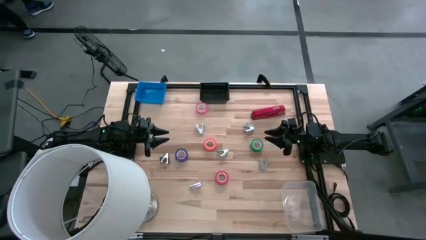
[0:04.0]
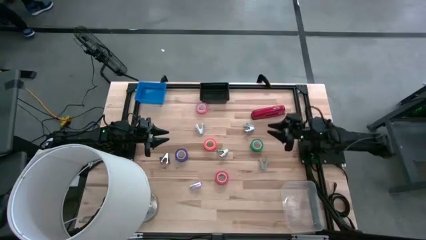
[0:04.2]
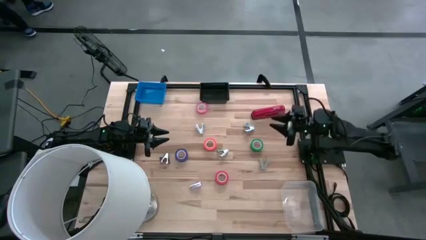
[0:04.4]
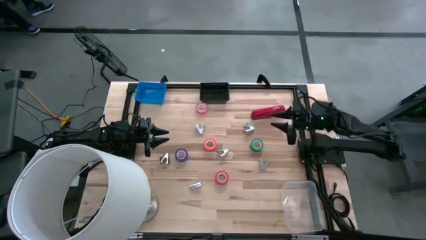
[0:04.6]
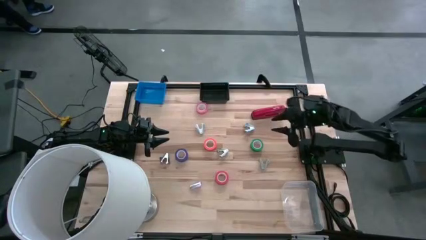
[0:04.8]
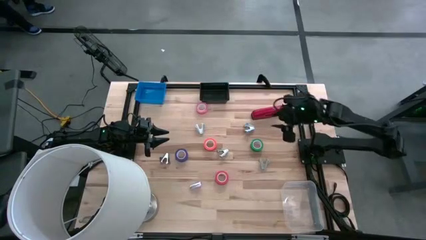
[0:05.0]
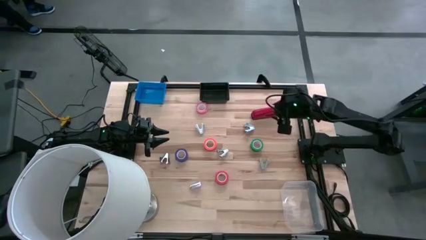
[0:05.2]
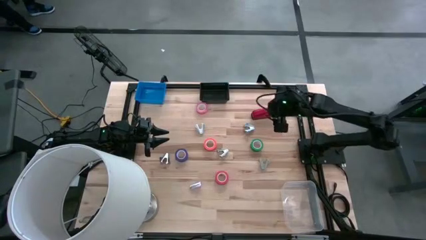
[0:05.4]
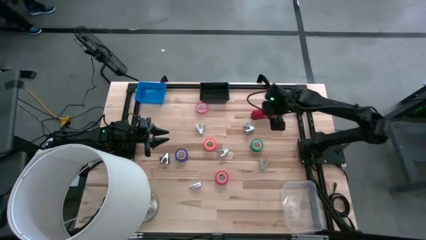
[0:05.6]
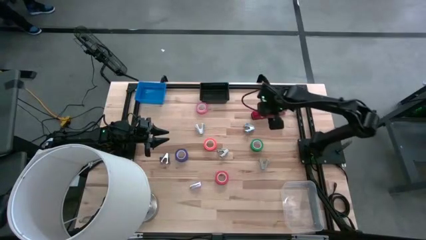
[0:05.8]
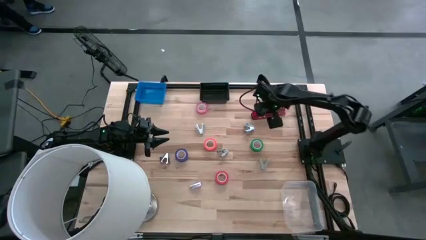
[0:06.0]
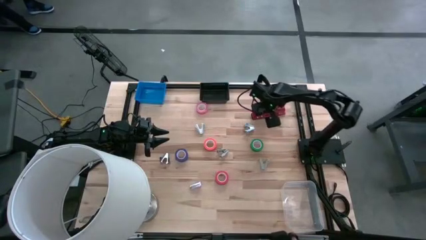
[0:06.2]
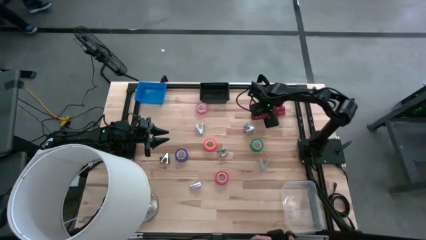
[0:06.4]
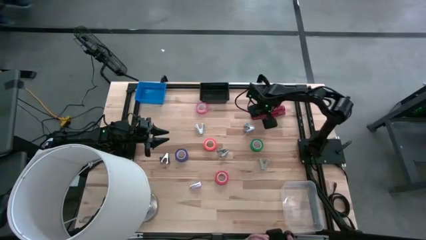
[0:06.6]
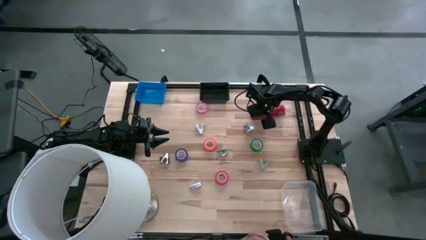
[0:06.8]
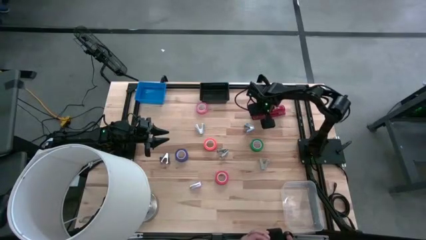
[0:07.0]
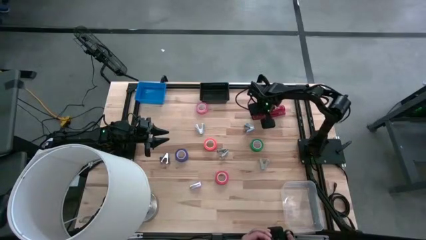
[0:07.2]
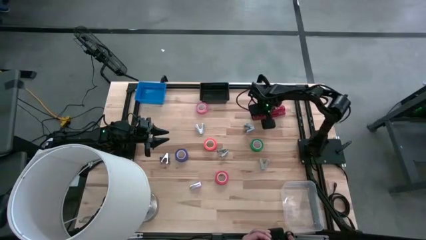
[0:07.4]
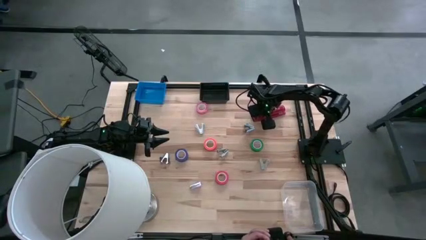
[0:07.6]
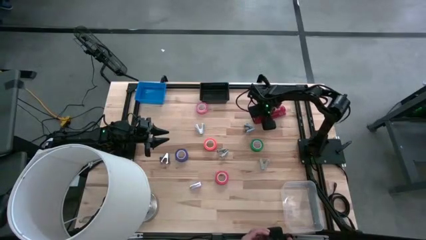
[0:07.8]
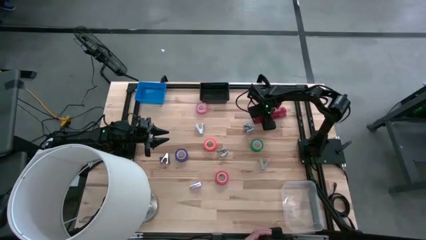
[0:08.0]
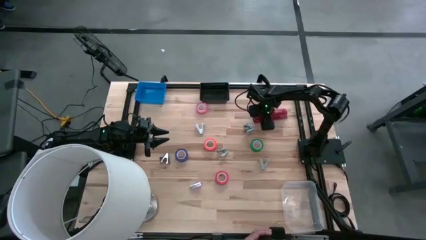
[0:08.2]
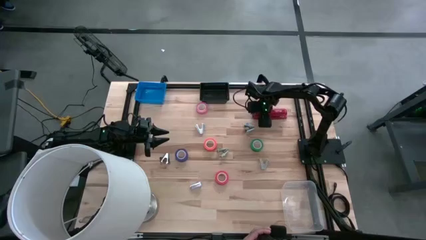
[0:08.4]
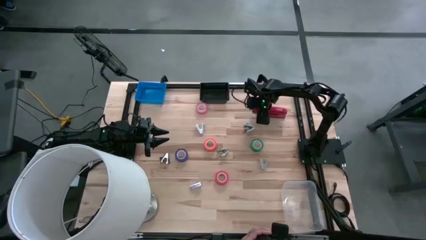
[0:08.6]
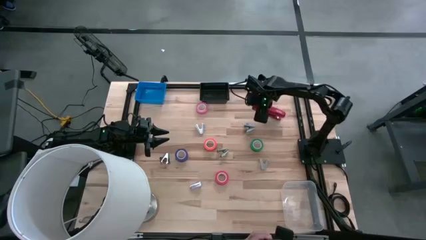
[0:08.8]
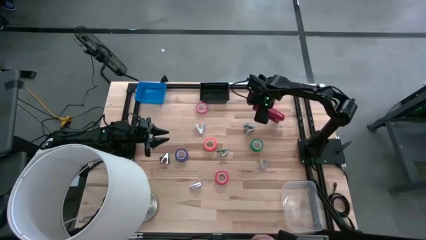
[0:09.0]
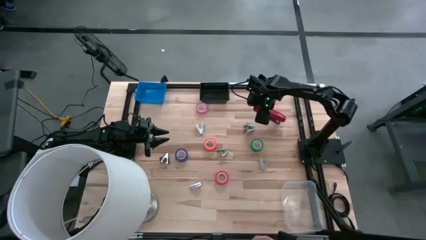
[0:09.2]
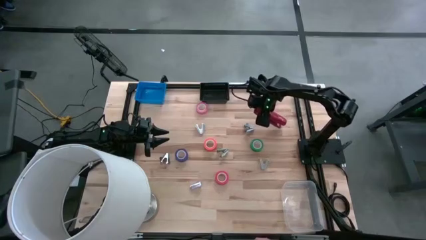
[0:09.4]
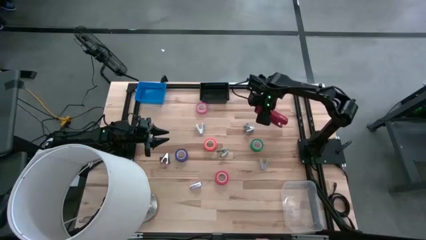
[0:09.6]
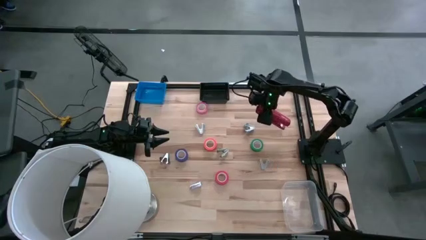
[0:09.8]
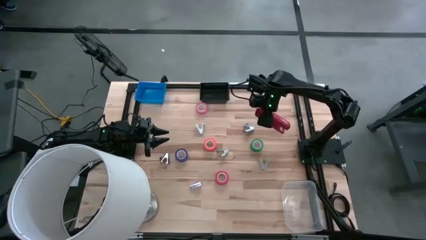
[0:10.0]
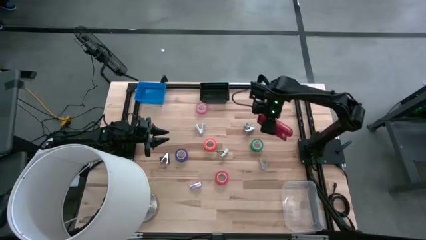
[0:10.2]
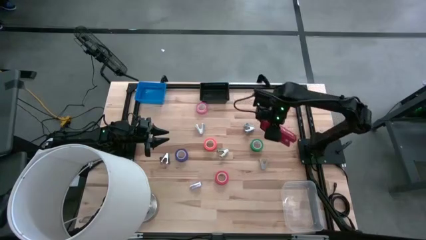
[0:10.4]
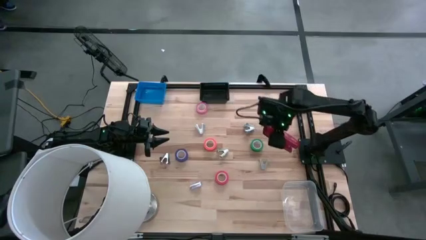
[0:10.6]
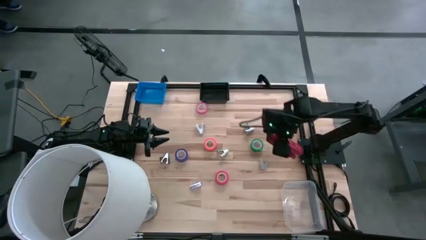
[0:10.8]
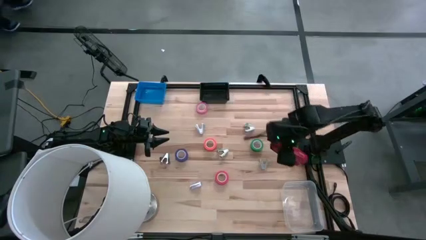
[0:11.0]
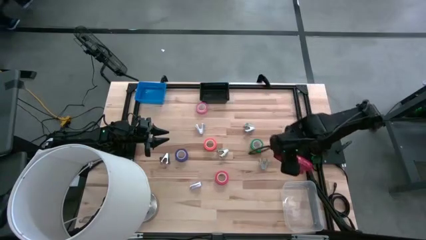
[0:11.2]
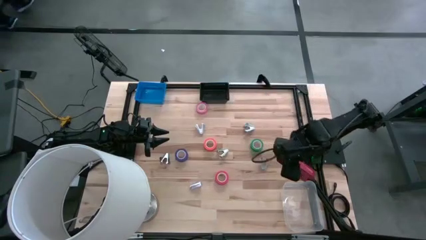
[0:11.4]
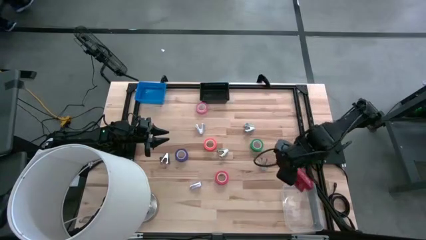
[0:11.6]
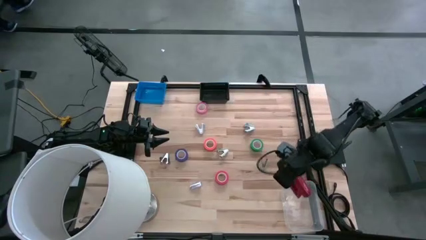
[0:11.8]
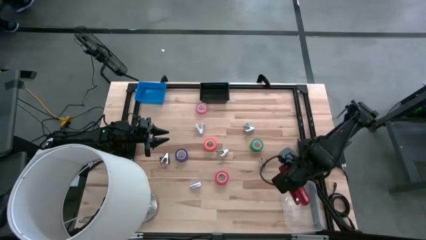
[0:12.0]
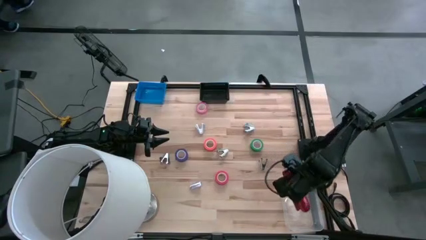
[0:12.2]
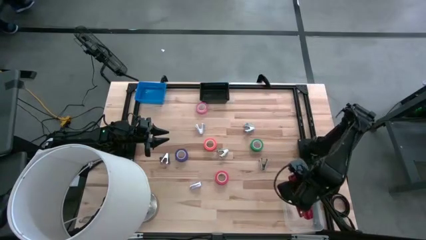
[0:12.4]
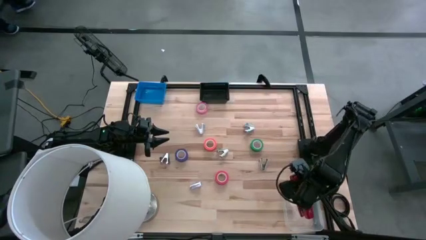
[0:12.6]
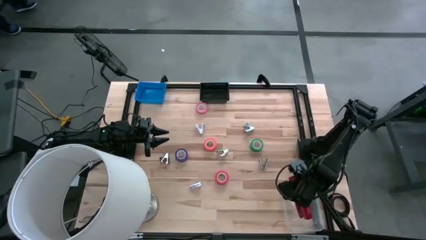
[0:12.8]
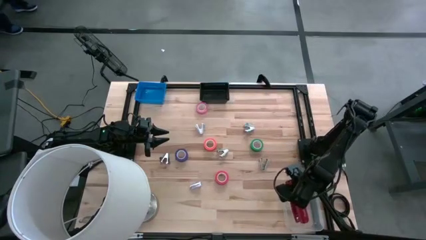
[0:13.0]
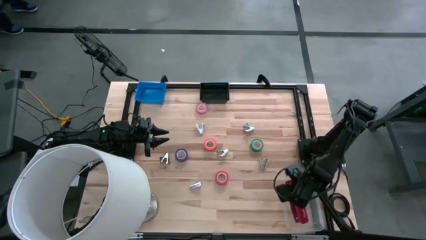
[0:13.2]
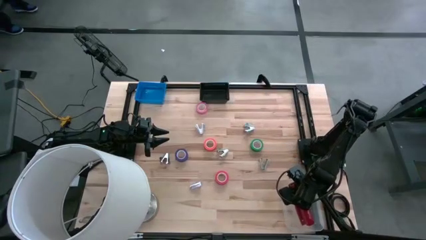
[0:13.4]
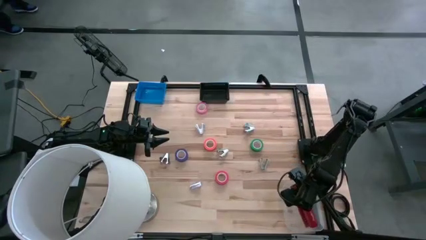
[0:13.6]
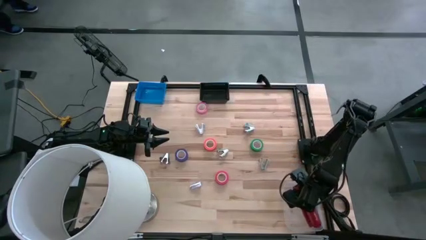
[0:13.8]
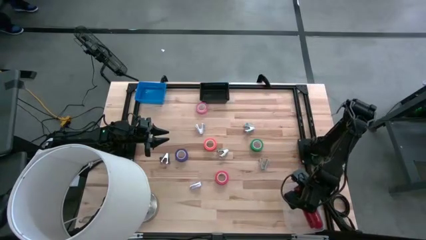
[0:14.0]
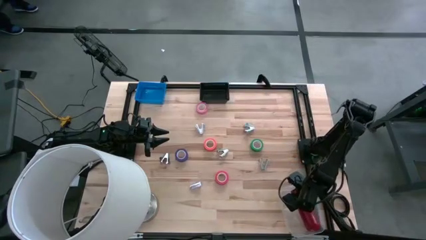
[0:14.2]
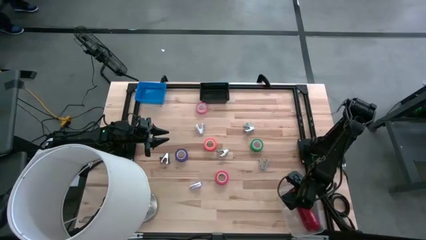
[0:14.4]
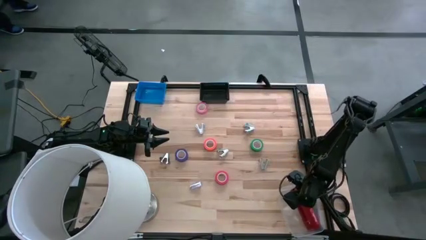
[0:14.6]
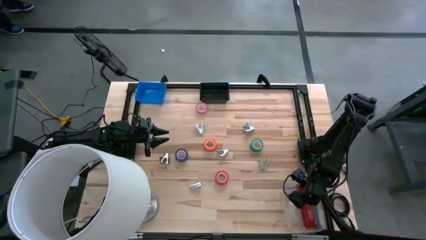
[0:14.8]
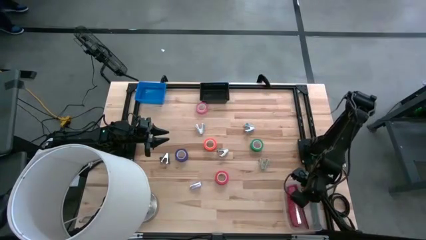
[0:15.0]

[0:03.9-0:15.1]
Task: Pick and place Stapler, Stapler remover, tape
Put the red stapler into the transparent bin

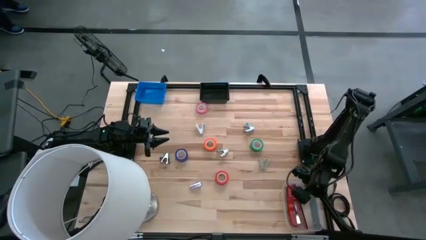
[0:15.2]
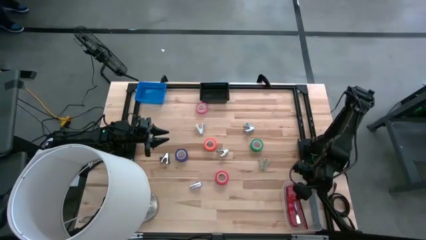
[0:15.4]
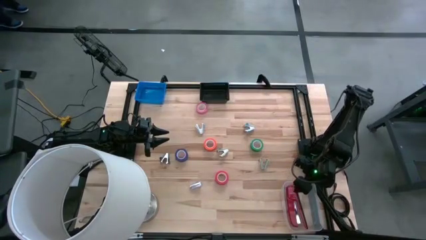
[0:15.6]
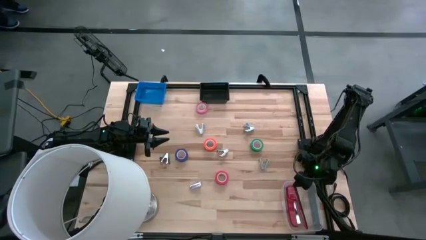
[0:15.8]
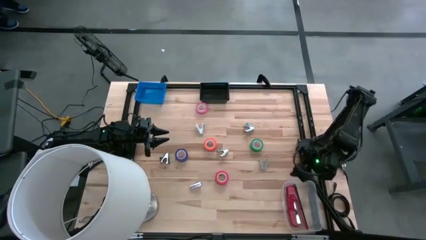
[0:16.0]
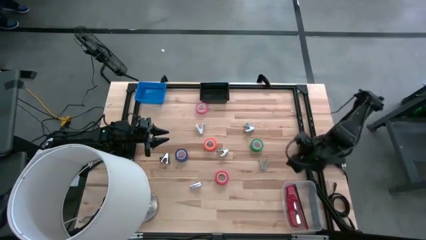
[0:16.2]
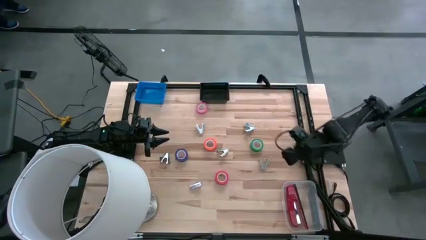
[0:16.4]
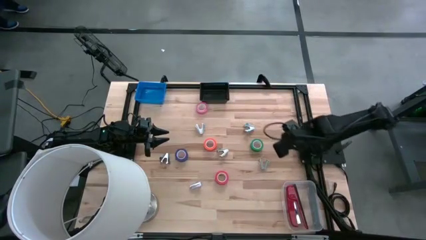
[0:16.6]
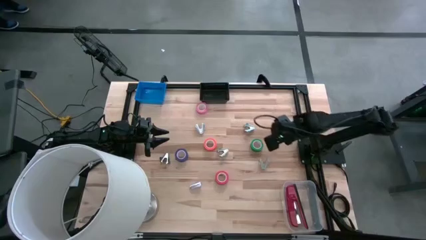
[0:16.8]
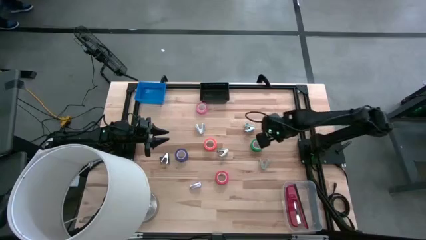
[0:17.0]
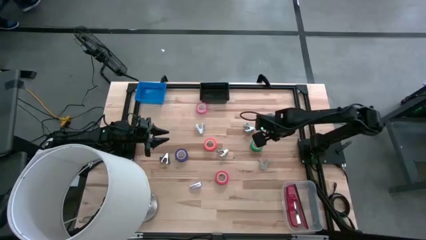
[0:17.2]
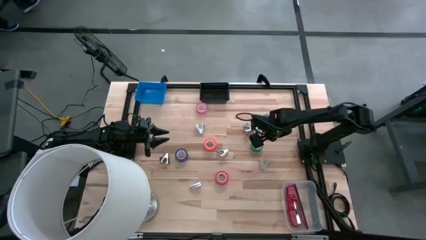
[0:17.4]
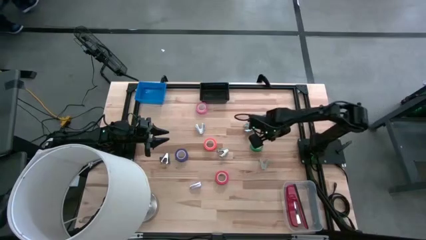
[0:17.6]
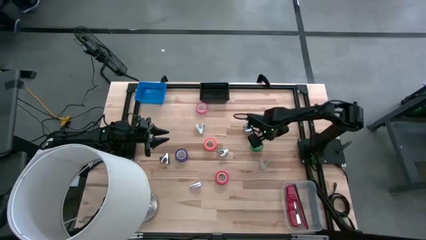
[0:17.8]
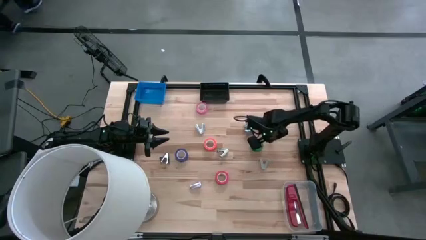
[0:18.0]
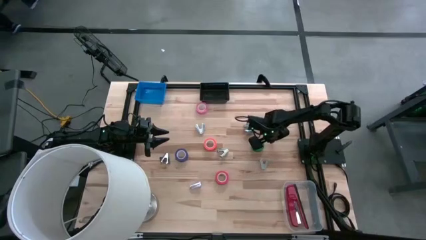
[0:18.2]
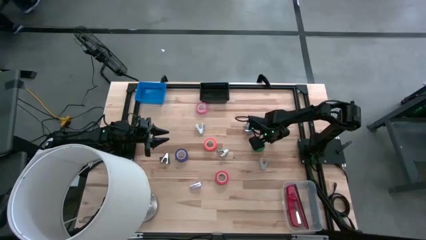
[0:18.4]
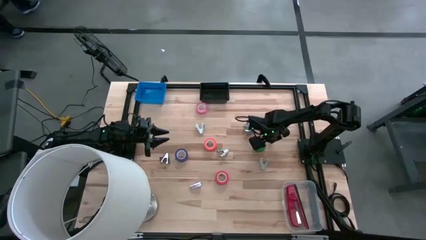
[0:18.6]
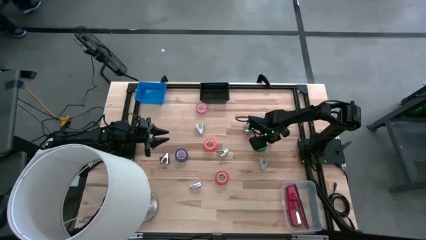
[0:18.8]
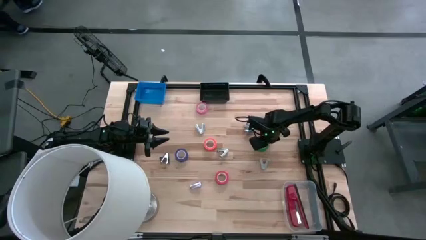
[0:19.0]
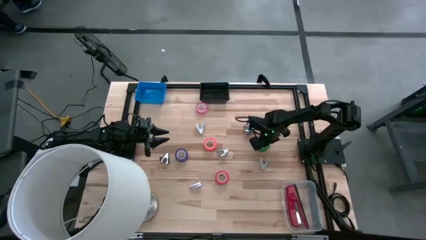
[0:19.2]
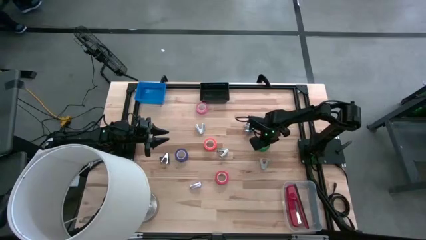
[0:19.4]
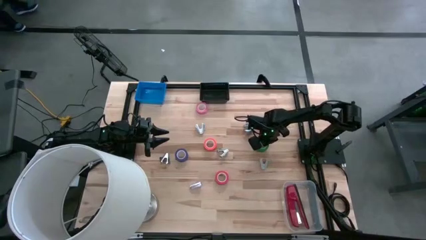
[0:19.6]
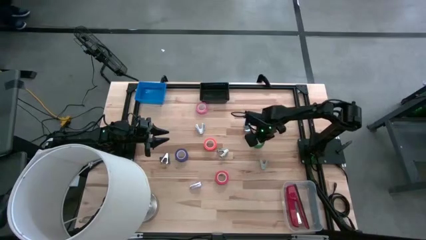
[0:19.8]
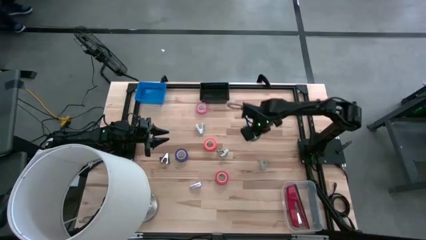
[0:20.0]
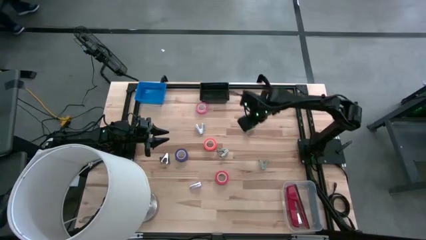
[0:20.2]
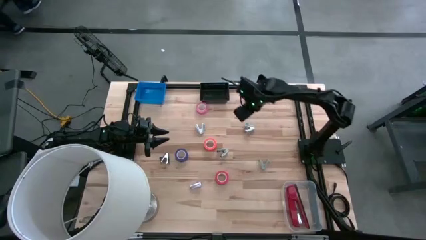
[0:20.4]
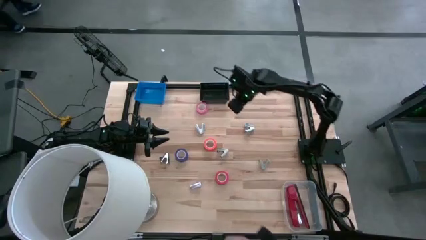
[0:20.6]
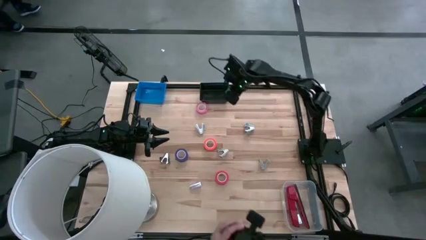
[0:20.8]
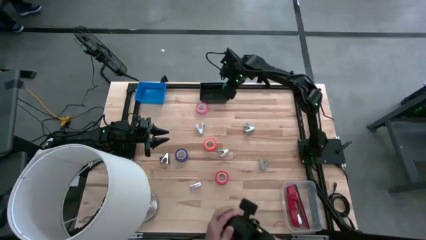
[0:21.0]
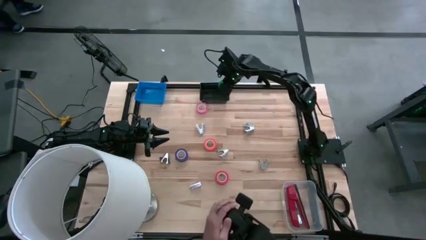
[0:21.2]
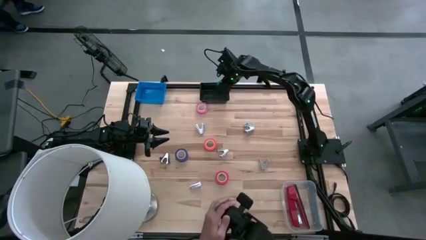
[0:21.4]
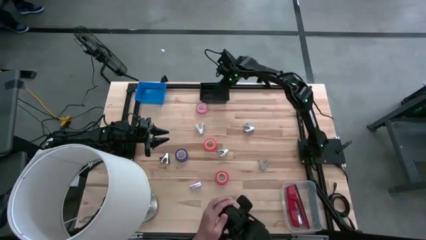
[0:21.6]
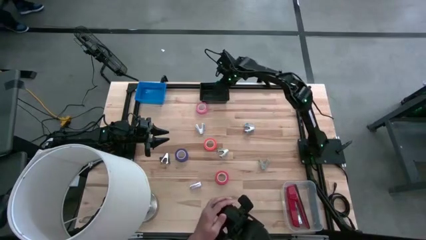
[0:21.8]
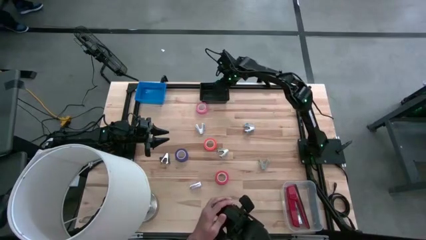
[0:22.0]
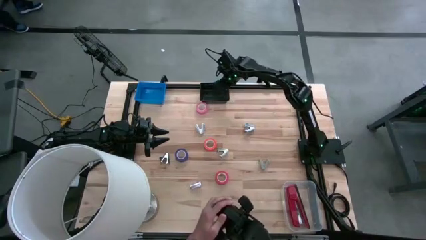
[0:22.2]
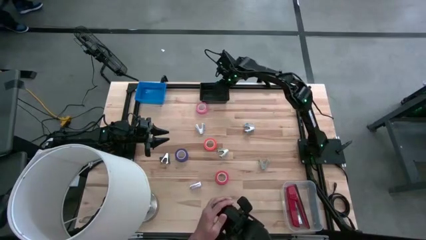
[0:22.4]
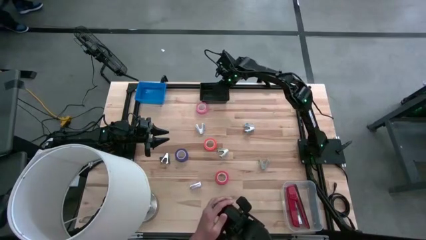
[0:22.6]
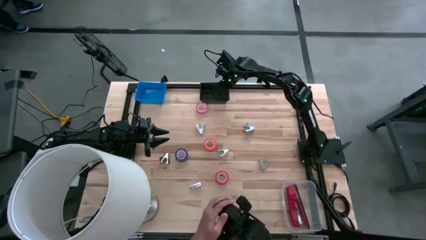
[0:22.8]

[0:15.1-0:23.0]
Put the green tape into the black bin
